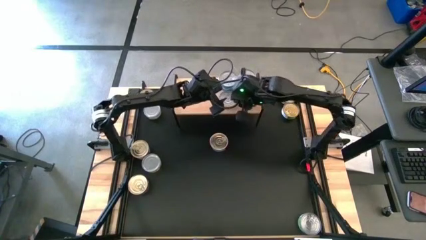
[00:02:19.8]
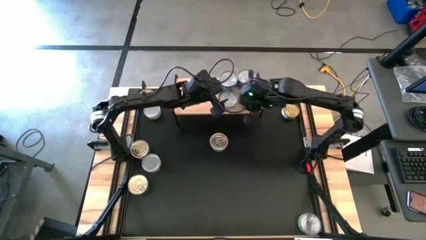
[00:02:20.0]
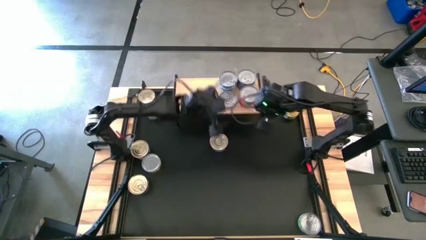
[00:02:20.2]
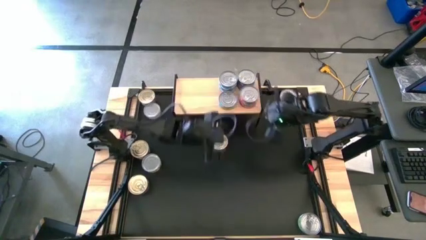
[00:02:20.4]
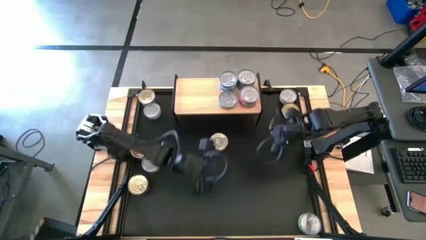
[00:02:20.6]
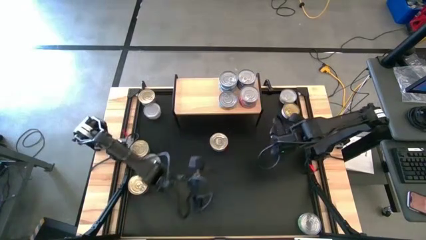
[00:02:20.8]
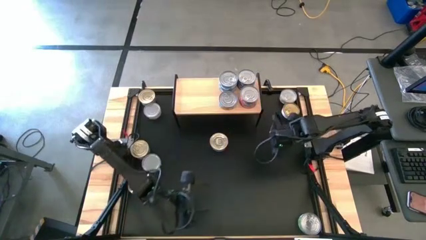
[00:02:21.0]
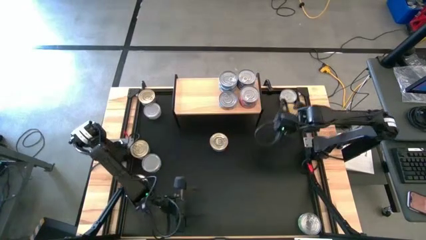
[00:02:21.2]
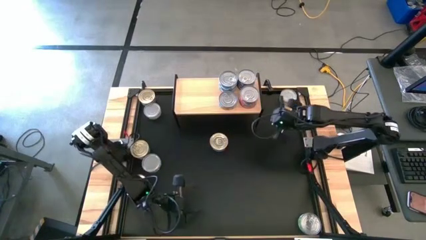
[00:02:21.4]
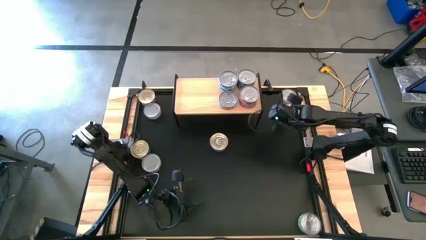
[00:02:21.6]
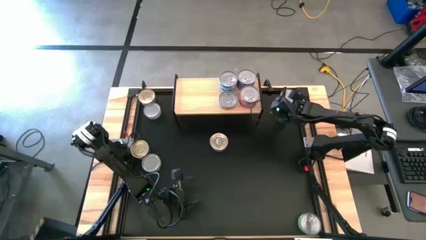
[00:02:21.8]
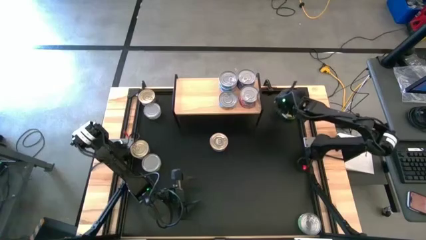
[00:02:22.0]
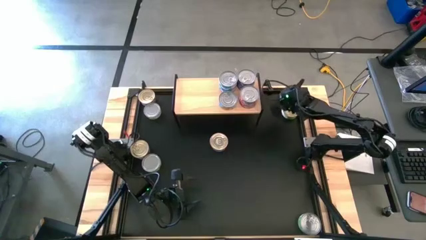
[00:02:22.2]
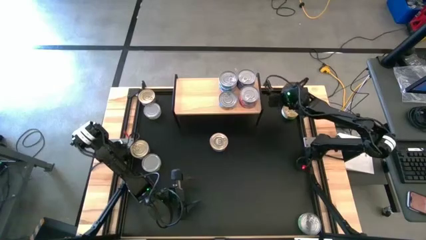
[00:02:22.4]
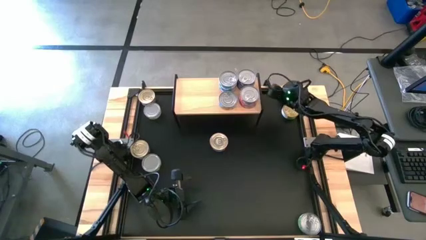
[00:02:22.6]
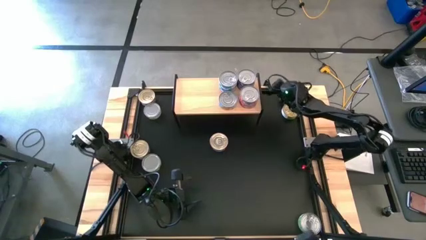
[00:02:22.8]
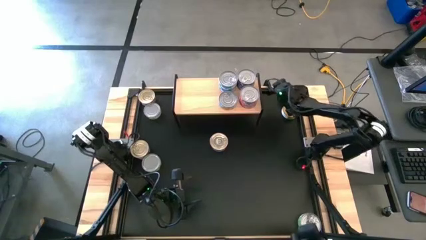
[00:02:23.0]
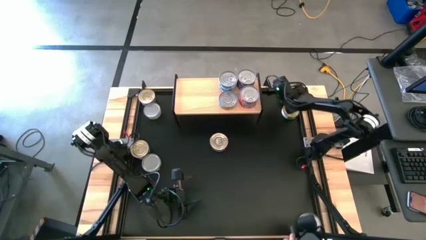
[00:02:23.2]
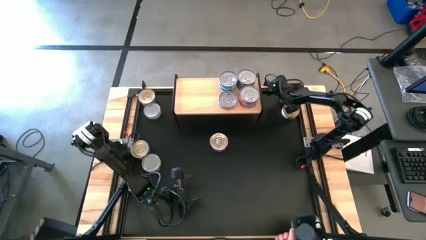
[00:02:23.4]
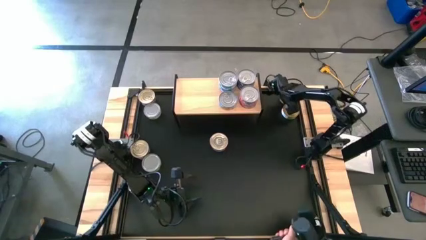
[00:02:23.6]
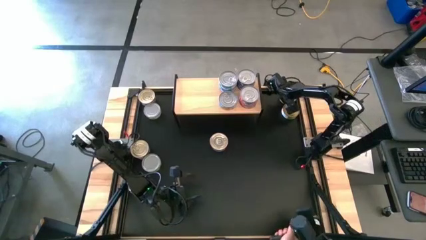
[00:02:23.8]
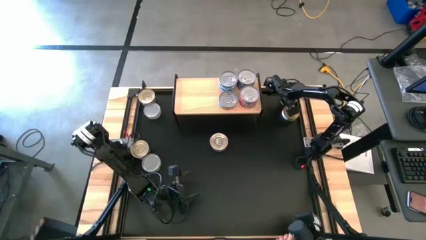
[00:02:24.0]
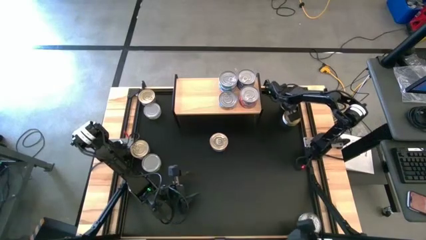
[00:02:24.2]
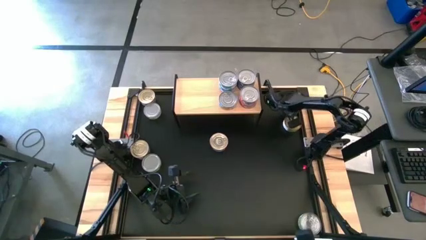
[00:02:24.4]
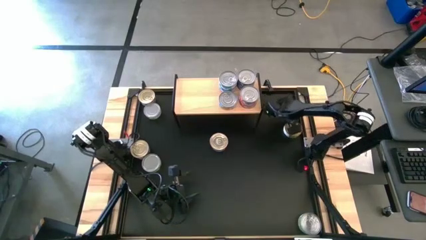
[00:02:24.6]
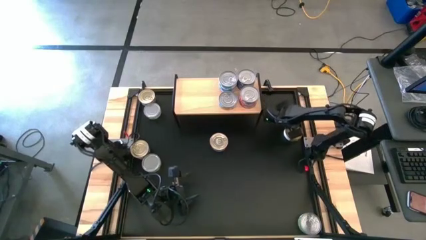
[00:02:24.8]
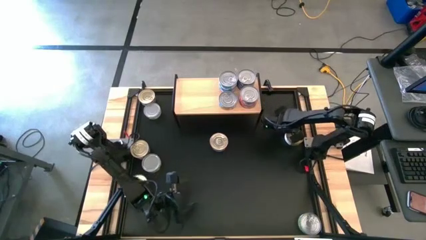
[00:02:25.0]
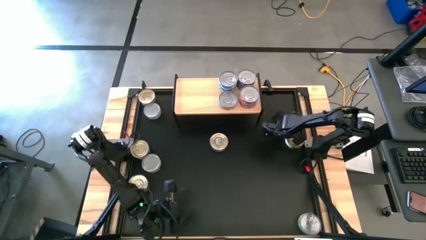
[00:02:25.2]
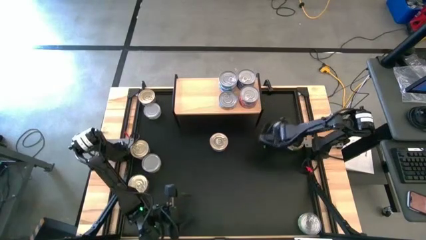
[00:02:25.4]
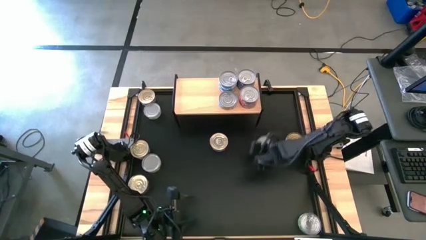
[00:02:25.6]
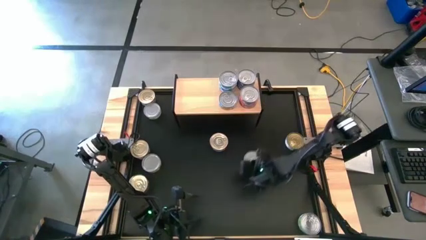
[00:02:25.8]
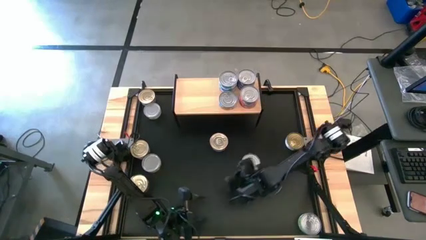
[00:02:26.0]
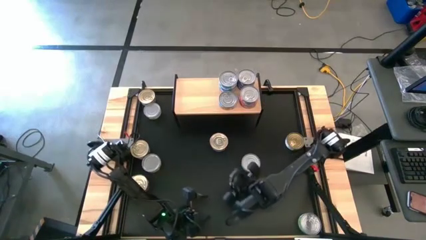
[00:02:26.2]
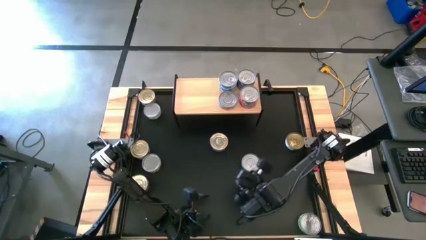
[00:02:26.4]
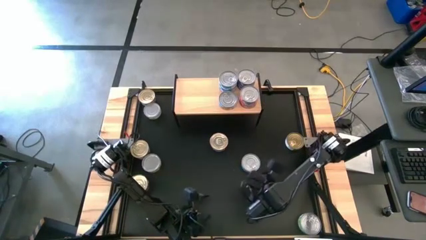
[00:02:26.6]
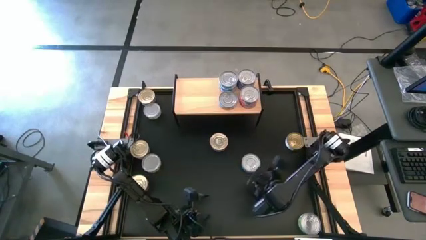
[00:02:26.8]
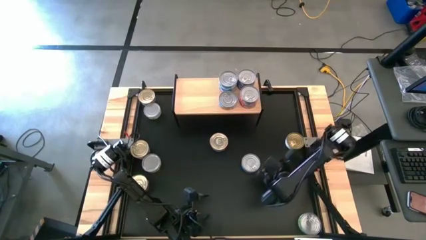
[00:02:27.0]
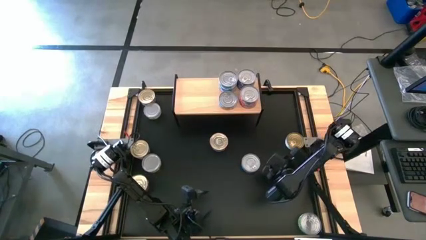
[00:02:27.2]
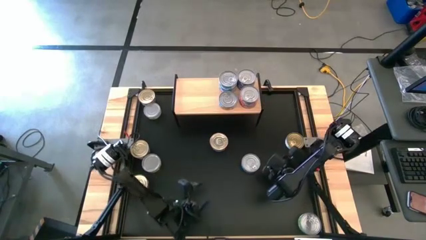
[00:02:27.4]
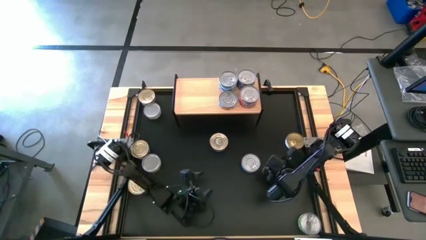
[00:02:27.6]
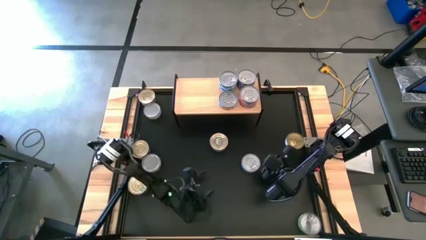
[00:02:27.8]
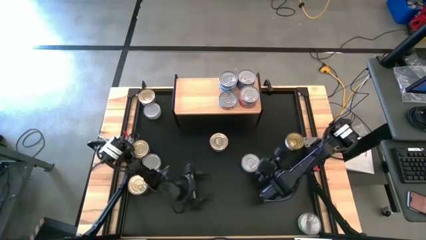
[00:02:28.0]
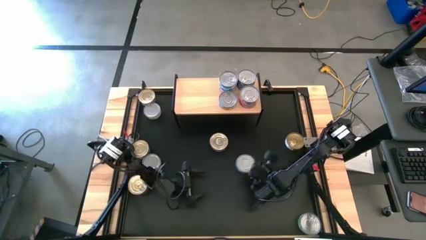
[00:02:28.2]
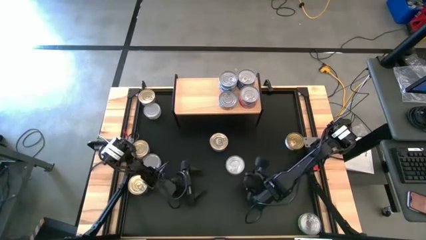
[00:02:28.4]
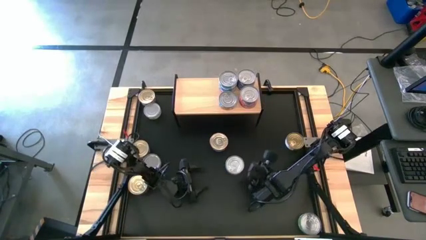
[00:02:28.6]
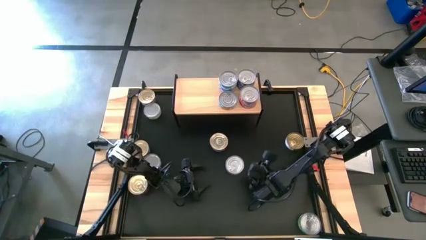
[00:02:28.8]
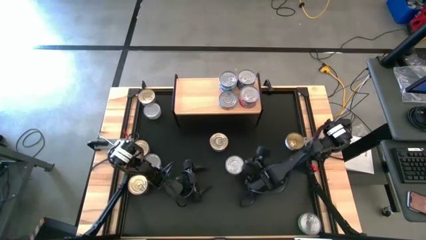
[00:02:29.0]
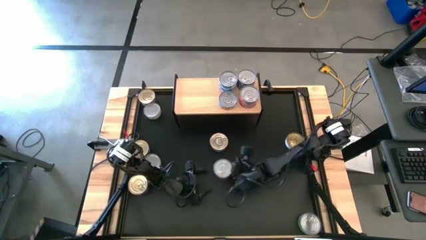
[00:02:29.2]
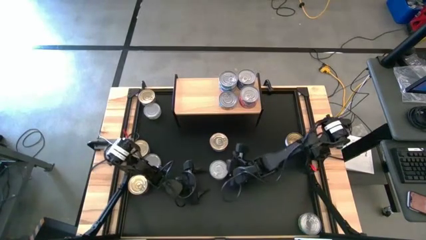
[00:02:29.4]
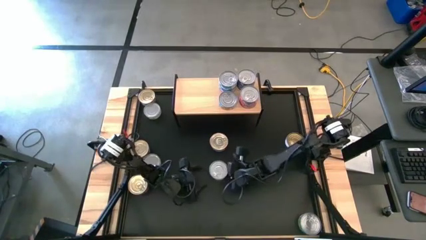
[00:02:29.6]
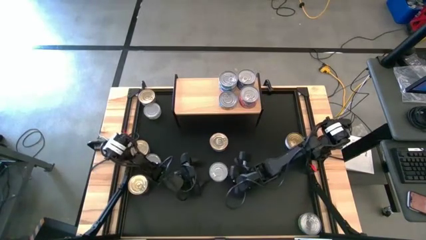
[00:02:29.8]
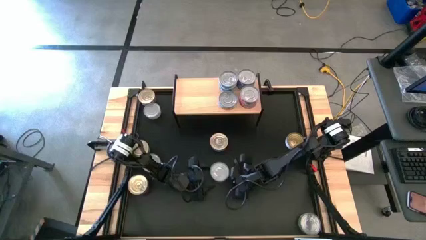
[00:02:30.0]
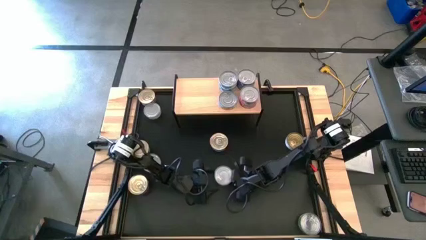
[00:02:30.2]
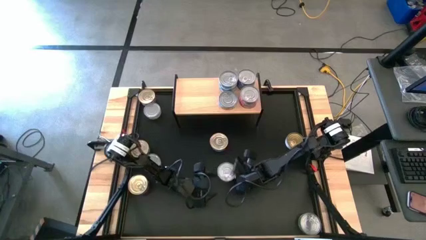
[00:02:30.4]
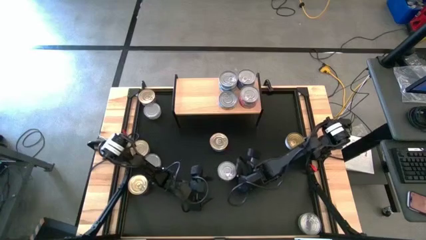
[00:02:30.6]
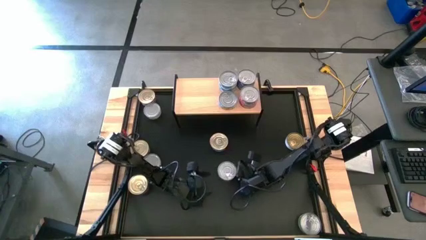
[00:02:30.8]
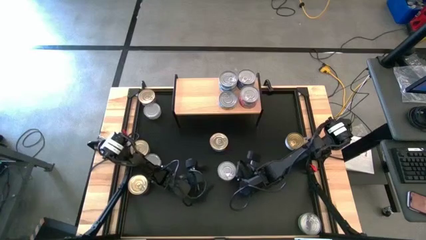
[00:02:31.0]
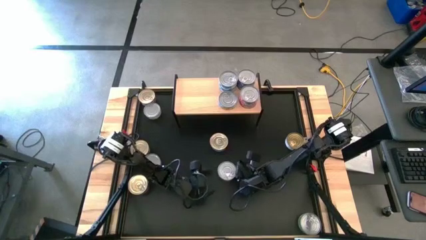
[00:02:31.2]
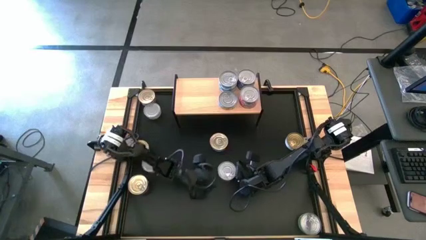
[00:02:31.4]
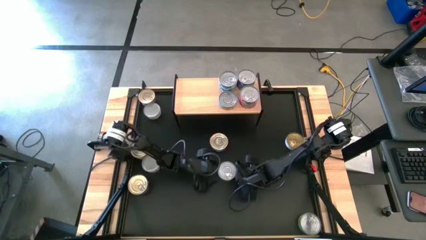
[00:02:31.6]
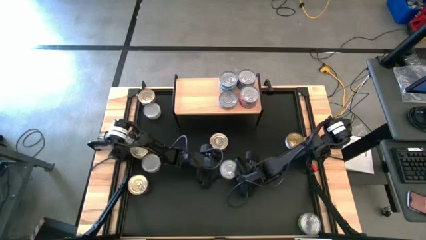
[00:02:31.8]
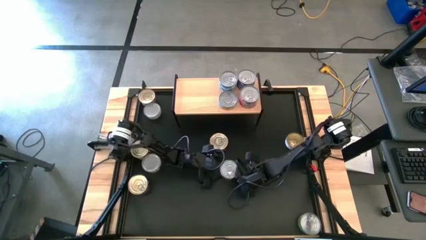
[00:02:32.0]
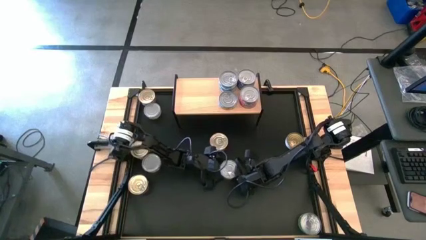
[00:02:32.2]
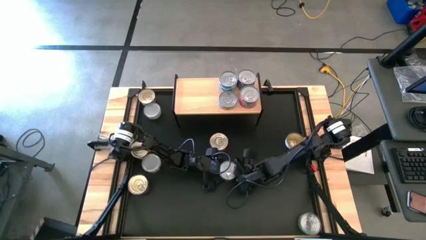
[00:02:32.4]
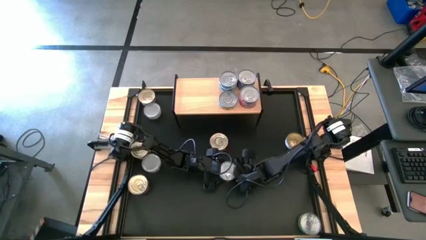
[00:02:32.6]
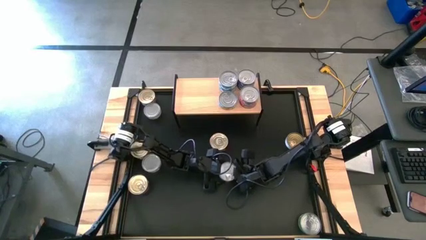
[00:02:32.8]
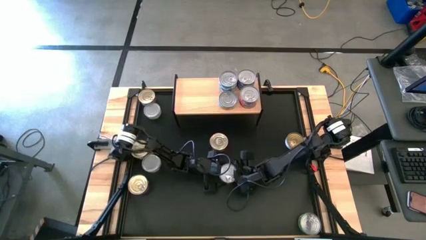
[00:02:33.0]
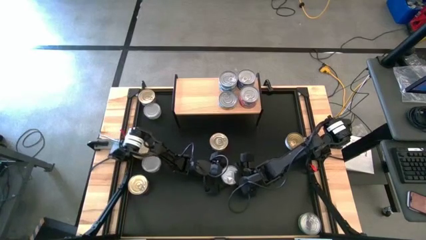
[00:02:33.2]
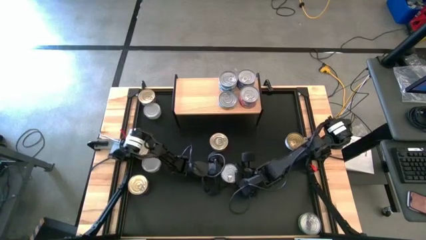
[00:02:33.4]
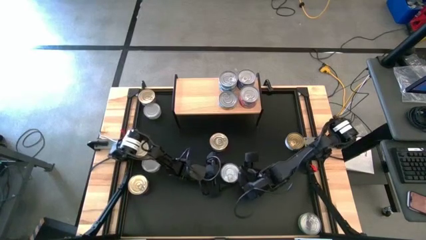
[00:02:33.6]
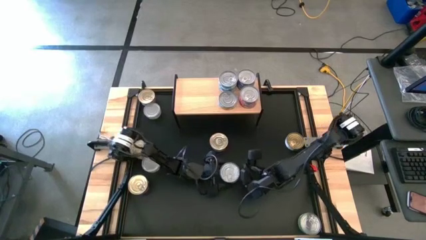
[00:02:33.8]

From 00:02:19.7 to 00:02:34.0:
Task: Stack canned seafood by type on shelf
Stack the yellow blue tuna can on top of the other yellow tuna can on the shelf
